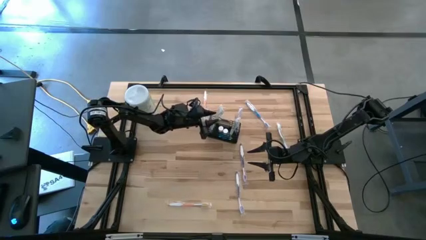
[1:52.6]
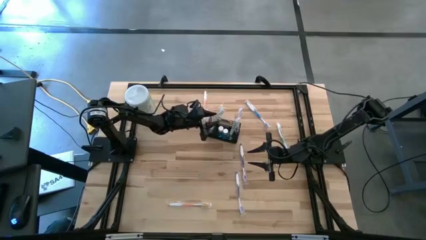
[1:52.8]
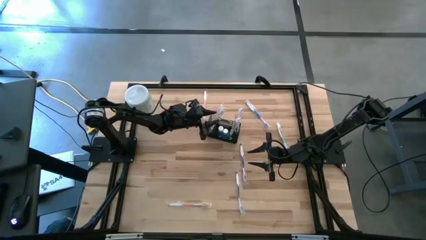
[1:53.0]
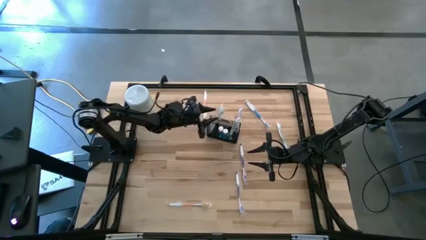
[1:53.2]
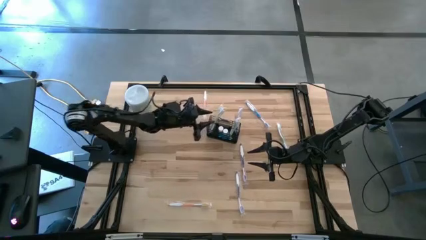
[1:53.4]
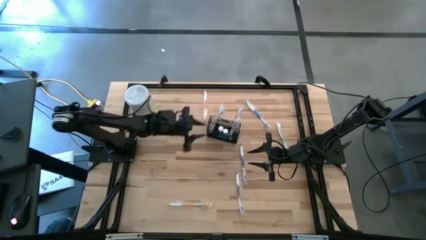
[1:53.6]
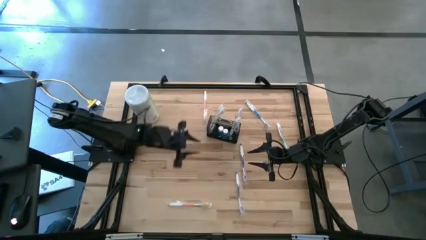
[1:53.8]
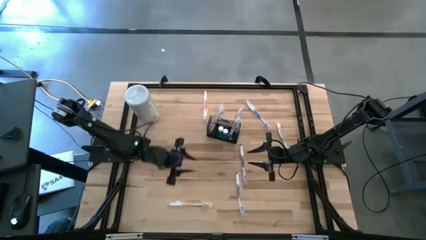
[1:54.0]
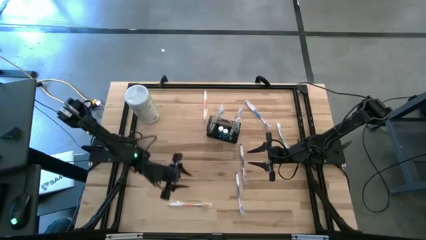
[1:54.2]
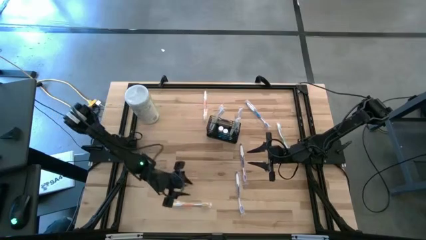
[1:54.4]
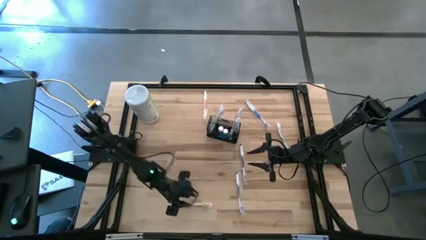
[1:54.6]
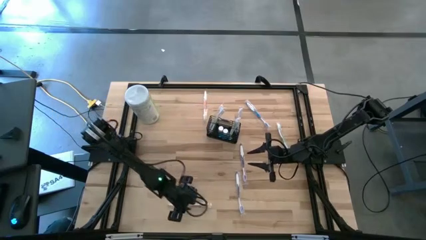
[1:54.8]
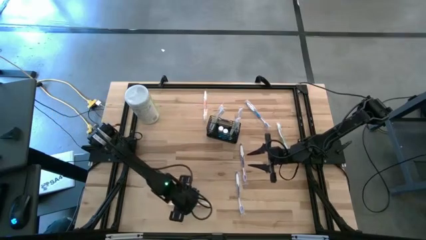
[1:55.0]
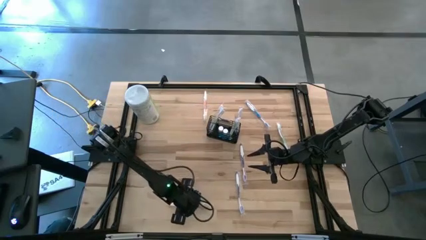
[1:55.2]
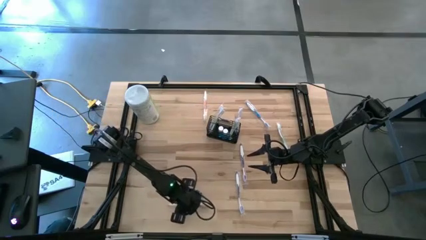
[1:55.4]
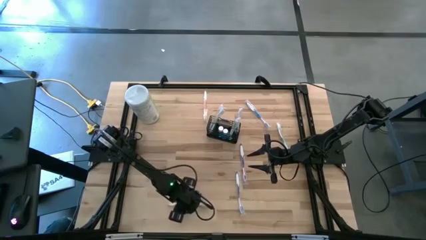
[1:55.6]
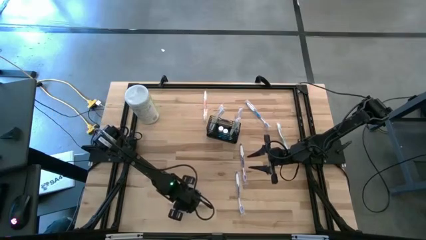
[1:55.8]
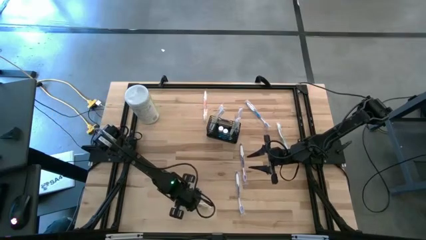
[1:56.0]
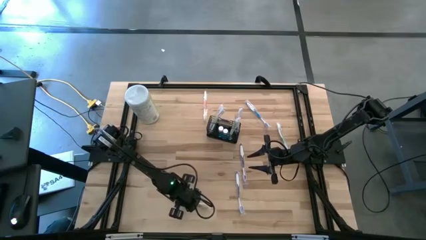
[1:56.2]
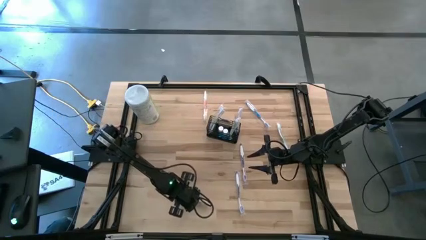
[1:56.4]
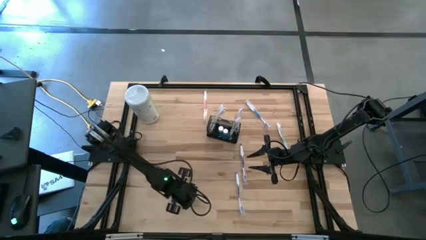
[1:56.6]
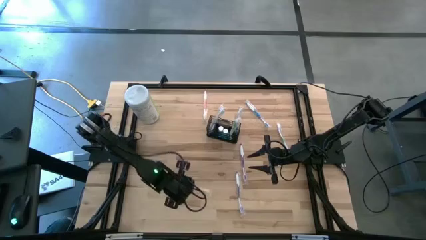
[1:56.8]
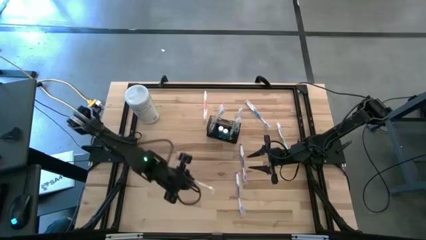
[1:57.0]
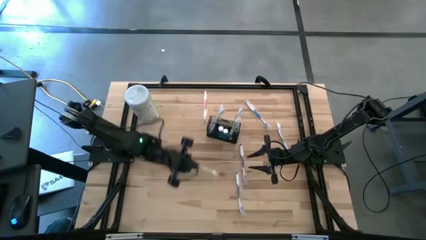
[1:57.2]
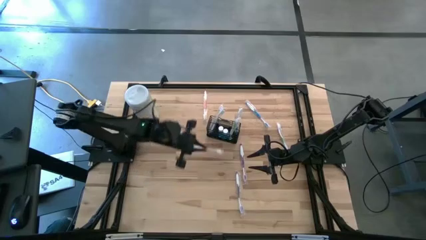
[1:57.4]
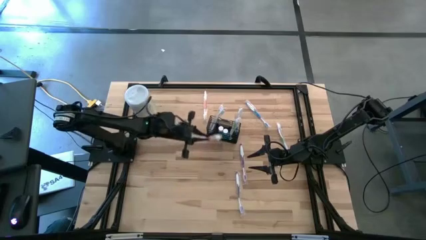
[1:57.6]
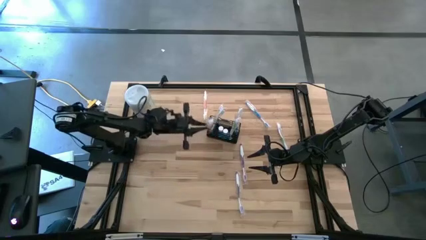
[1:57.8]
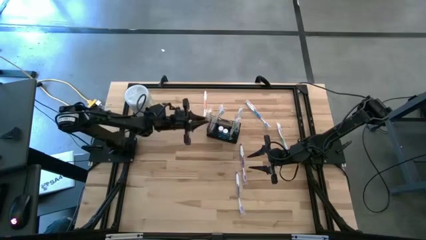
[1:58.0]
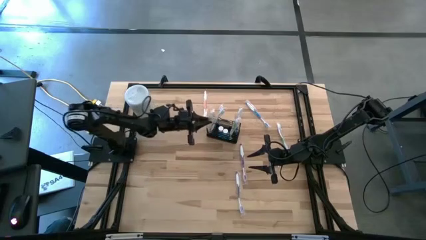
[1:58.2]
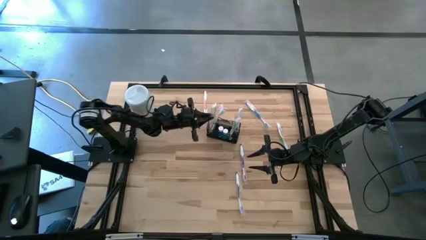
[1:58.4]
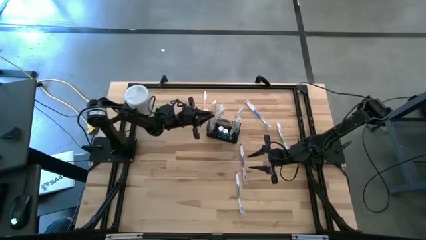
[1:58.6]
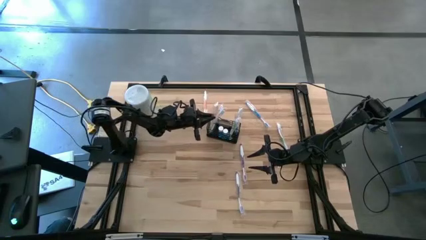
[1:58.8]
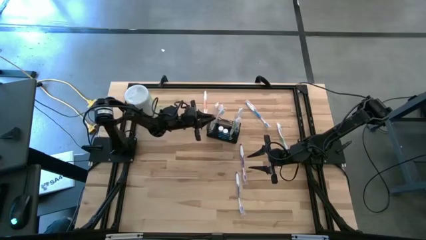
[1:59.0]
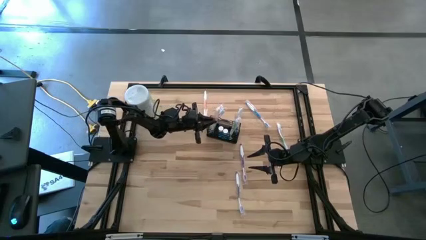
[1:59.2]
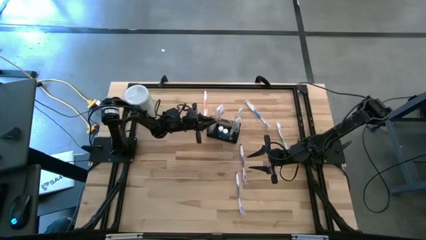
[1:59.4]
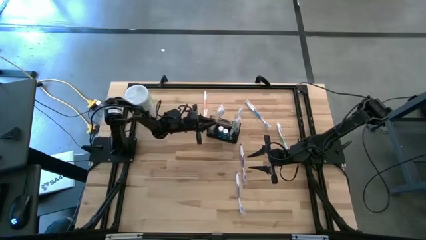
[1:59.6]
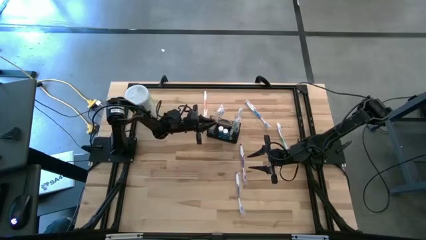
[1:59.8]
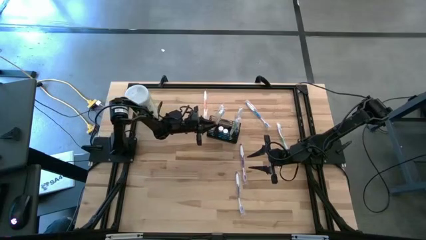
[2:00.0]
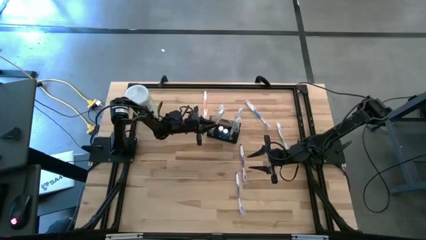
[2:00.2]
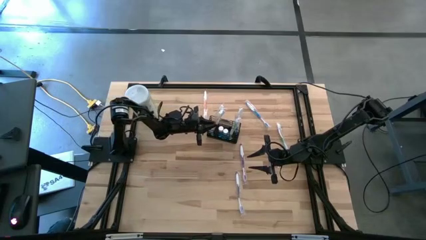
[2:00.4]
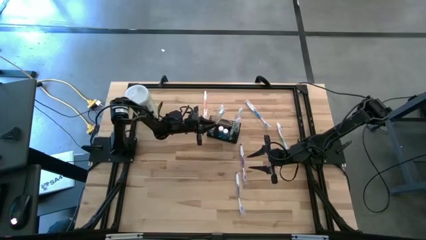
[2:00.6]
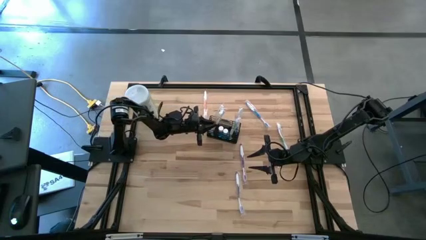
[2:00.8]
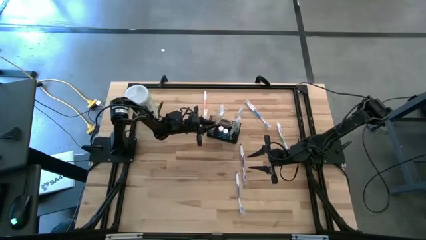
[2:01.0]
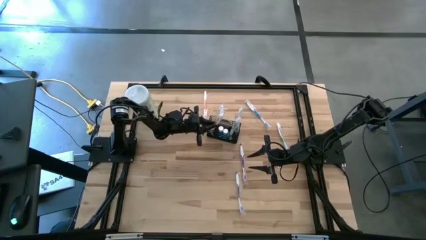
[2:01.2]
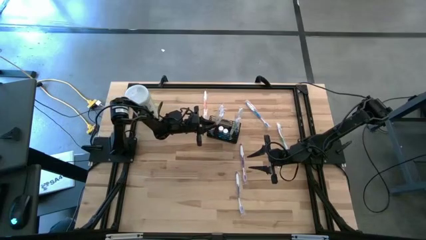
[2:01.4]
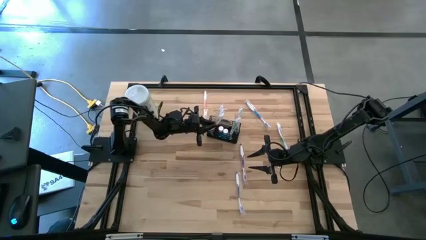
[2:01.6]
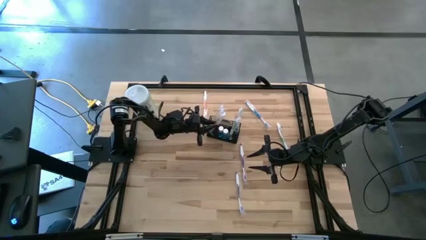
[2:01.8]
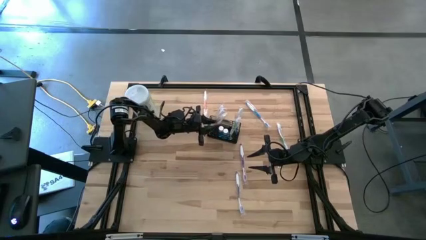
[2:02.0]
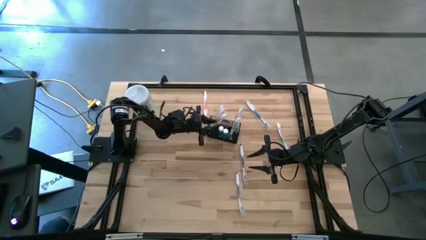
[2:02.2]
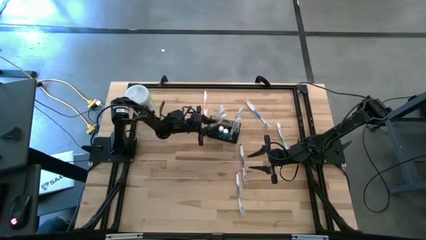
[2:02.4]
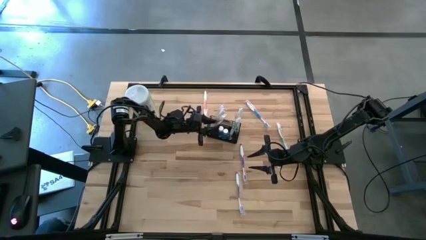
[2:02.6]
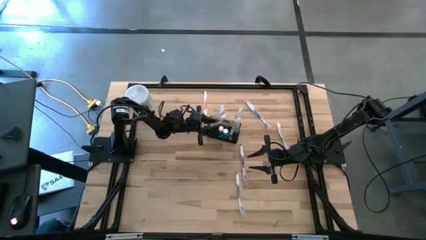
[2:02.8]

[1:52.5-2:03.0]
Task: Pick & Place toothbrushing station
Put the bottom orange toothbrush into the mesh organizer

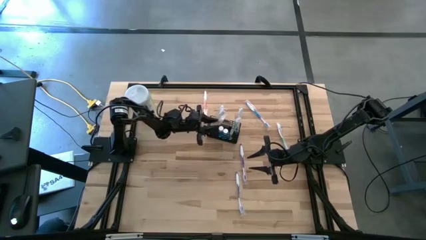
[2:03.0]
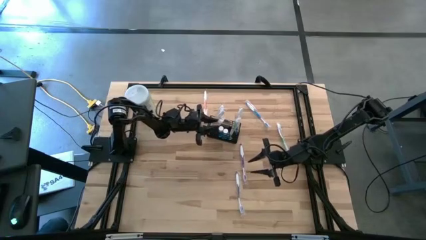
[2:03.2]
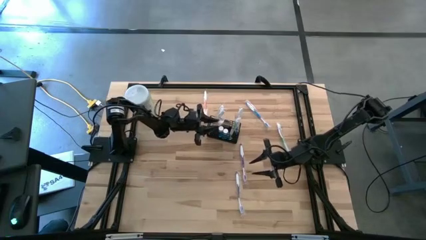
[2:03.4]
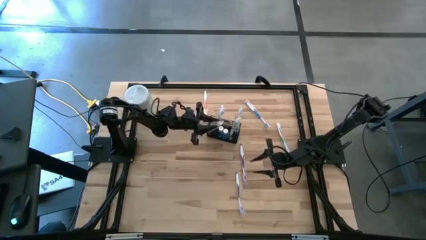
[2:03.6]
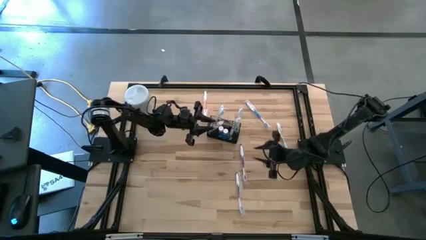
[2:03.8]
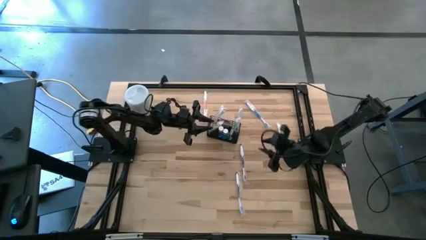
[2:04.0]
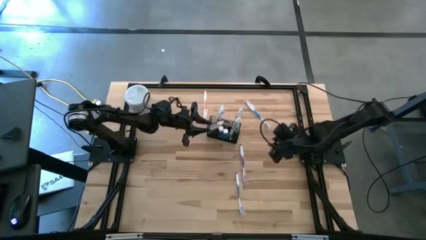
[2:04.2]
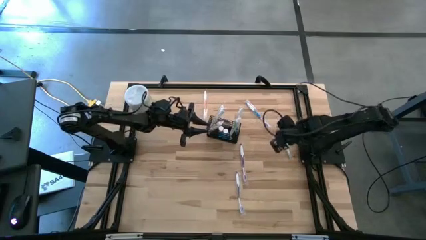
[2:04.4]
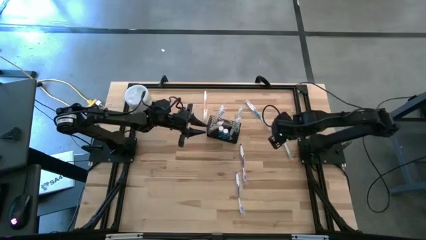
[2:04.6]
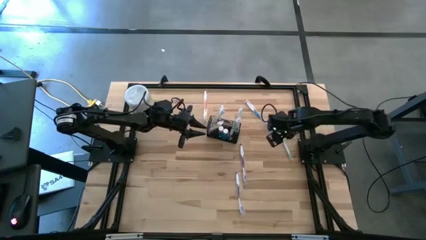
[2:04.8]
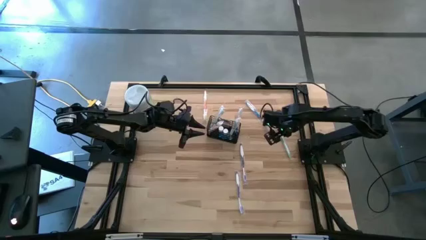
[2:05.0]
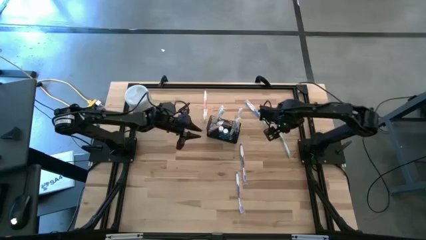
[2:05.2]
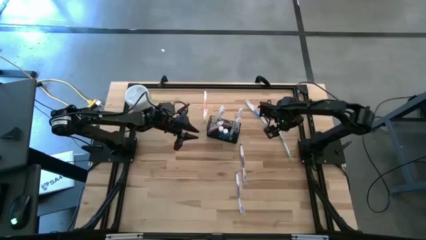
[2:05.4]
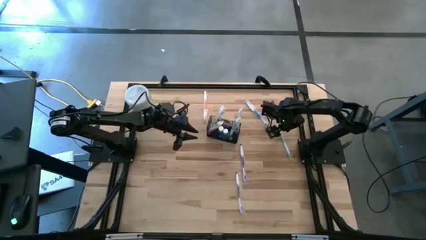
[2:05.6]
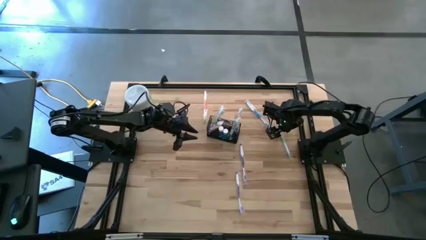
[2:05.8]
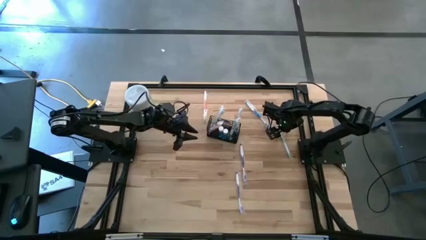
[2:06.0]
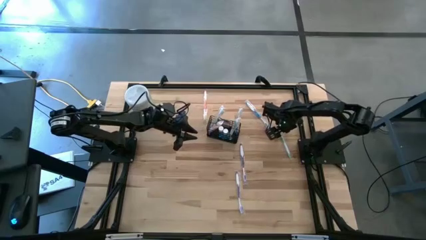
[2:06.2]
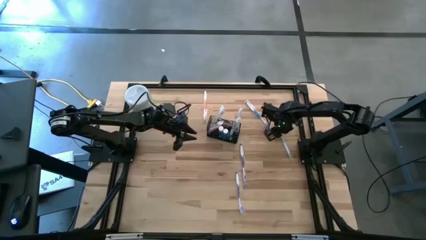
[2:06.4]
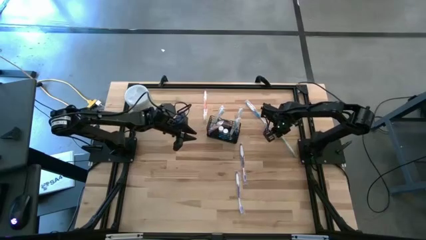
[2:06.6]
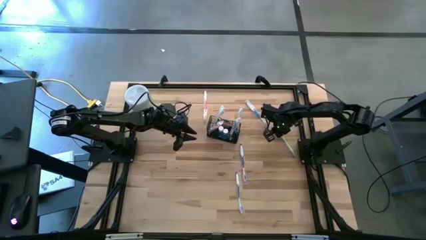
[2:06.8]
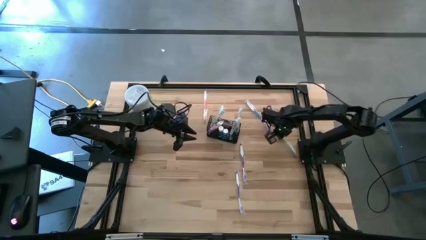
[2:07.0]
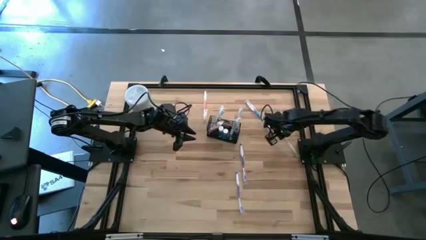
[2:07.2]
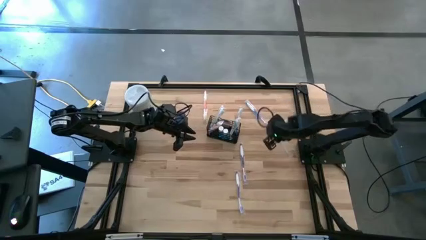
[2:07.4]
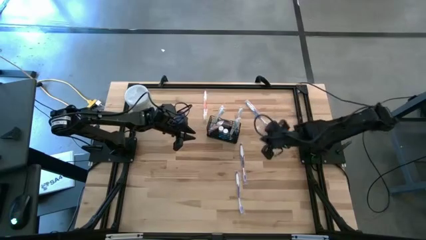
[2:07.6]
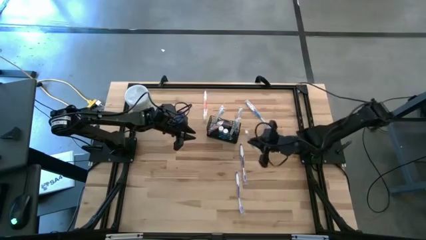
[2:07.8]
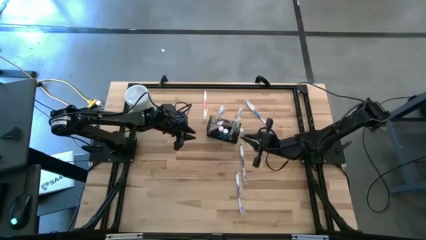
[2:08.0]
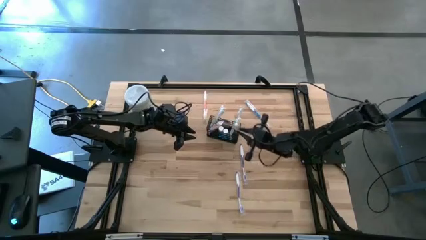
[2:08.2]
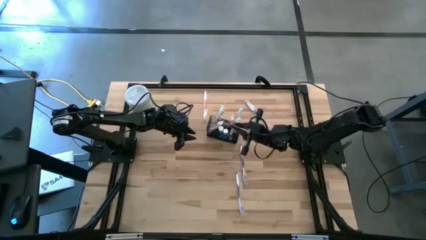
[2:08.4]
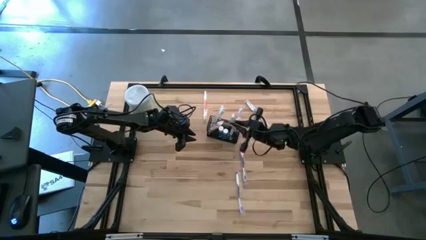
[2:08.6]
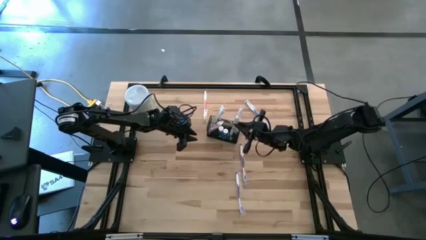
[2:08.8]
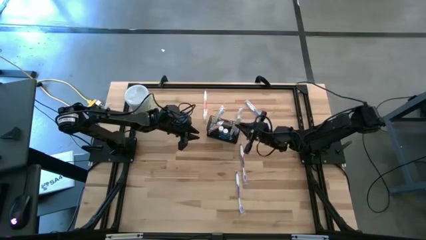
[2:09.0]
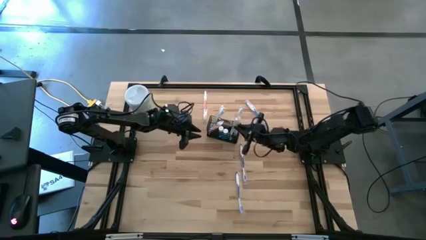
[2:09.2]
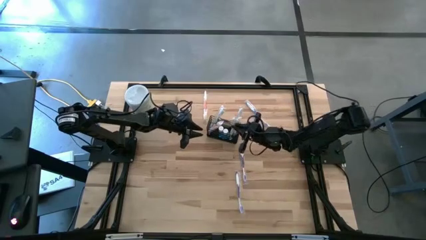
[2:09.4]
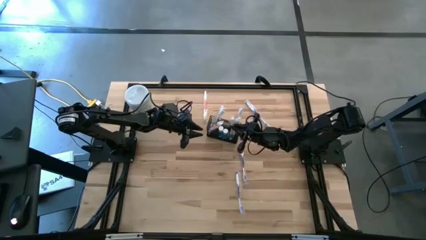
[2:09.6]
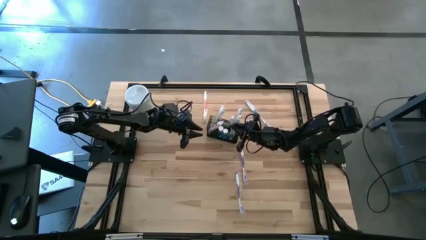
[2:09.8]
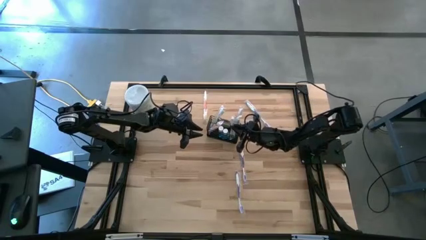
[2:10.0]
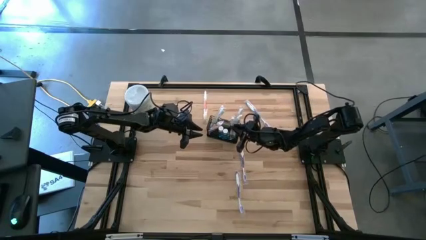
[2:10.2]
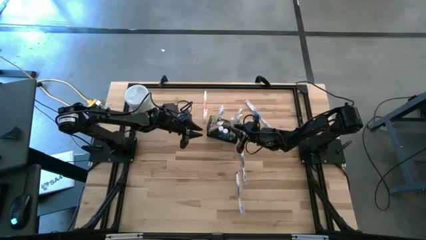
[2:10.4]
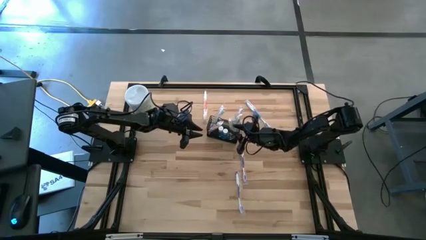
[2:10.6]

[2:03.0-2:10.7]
Put the green toothbrush into the mesh organizer
